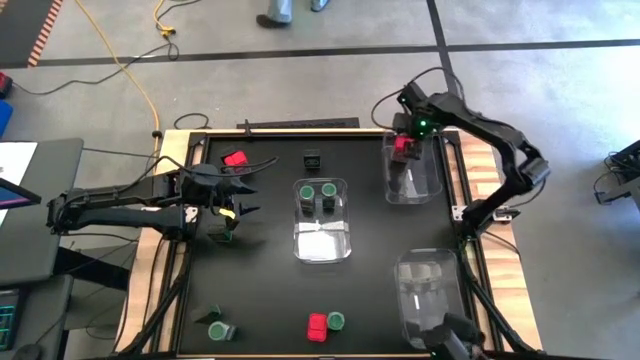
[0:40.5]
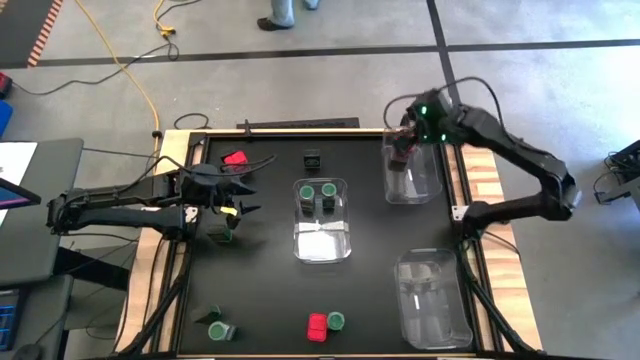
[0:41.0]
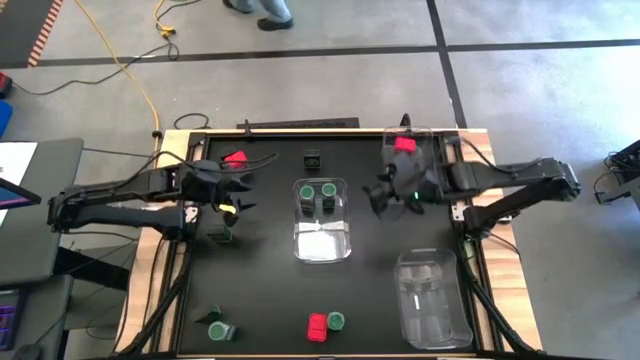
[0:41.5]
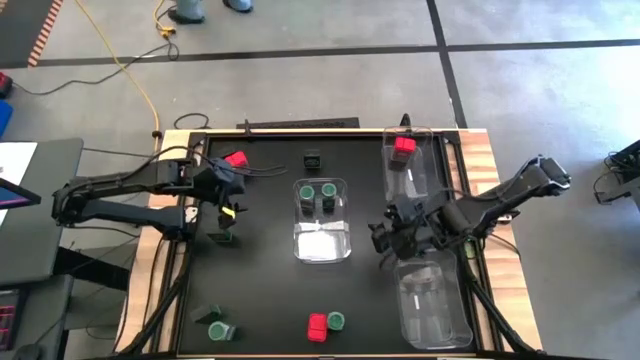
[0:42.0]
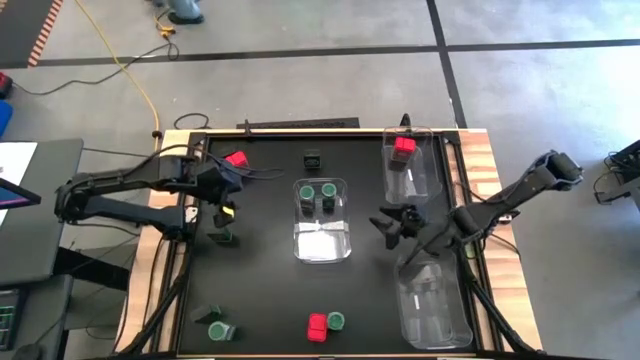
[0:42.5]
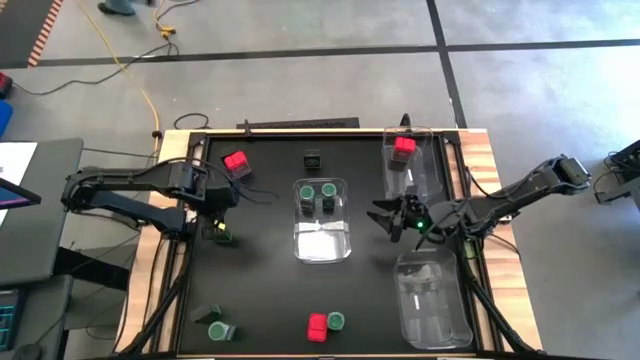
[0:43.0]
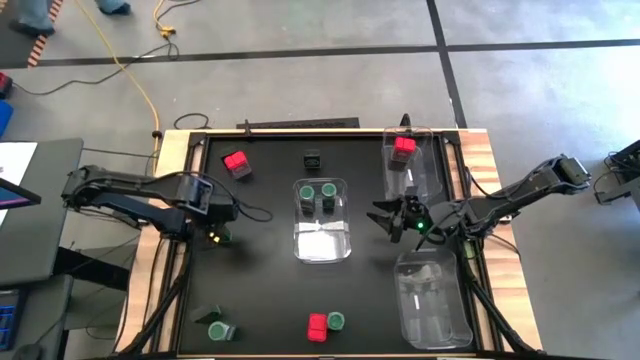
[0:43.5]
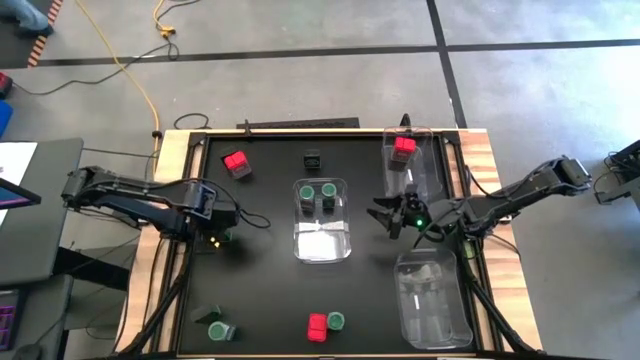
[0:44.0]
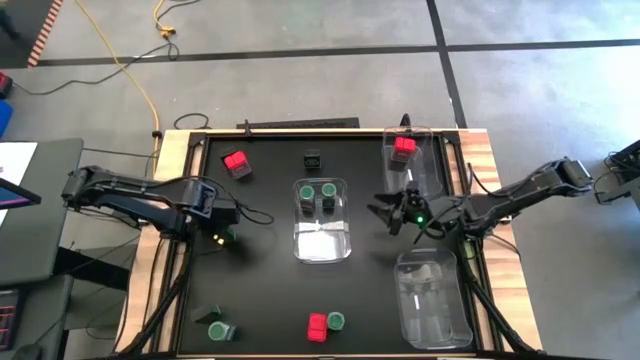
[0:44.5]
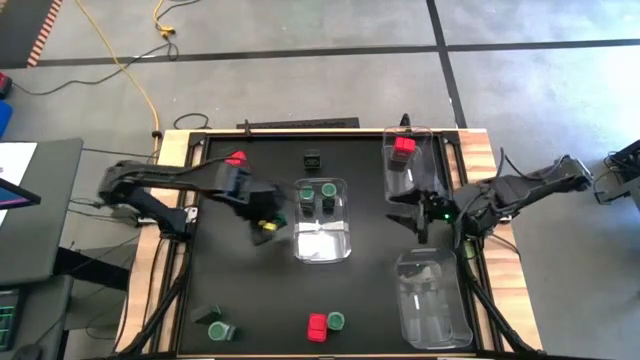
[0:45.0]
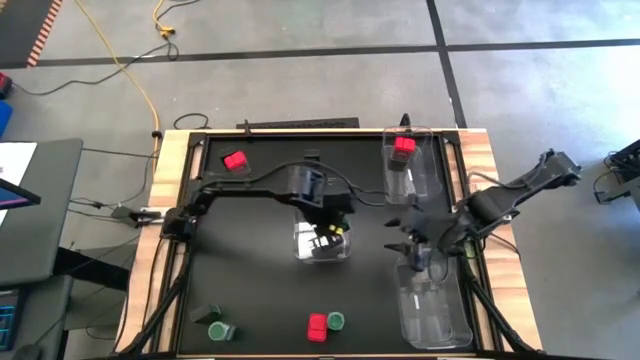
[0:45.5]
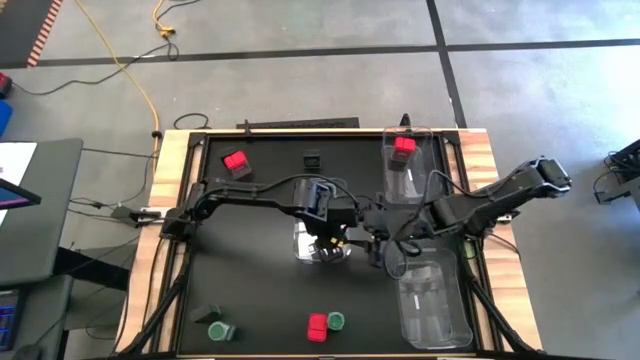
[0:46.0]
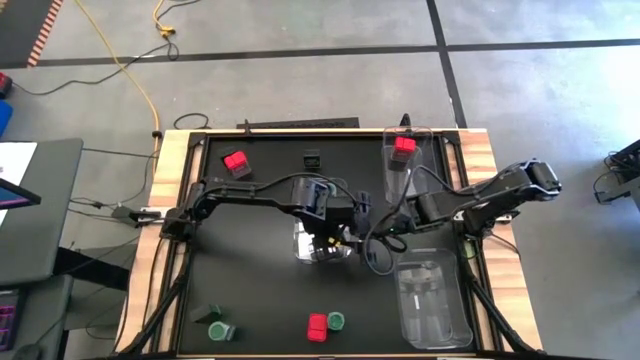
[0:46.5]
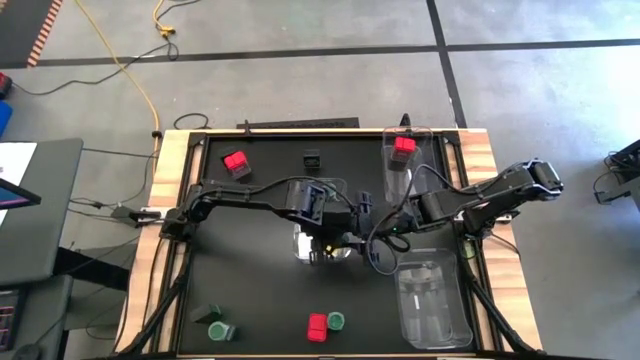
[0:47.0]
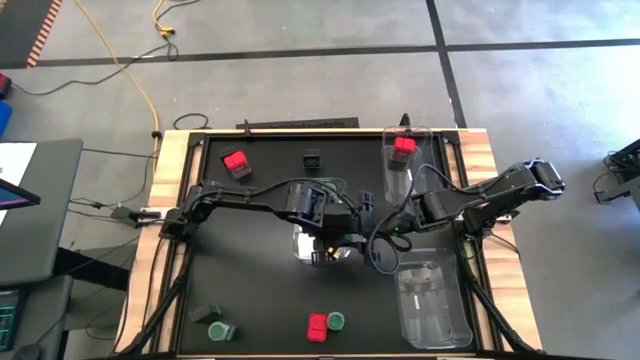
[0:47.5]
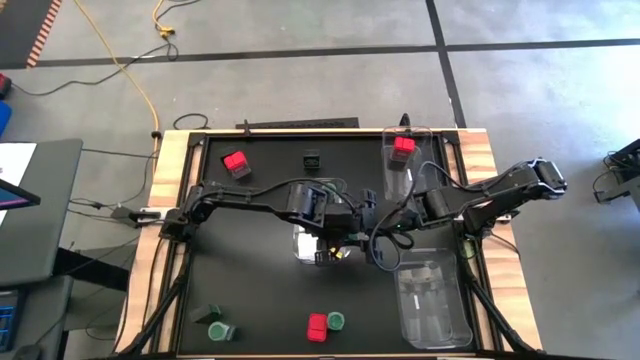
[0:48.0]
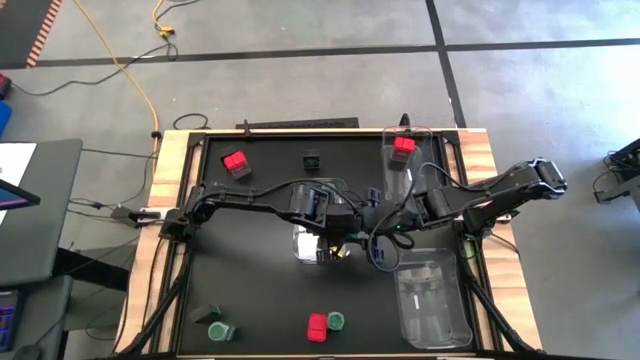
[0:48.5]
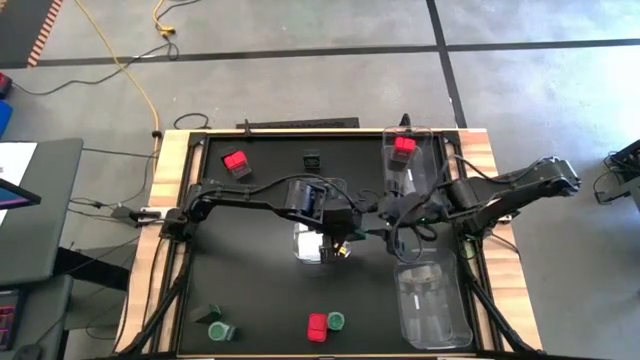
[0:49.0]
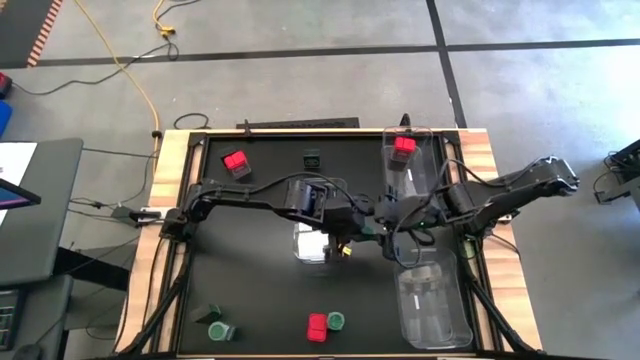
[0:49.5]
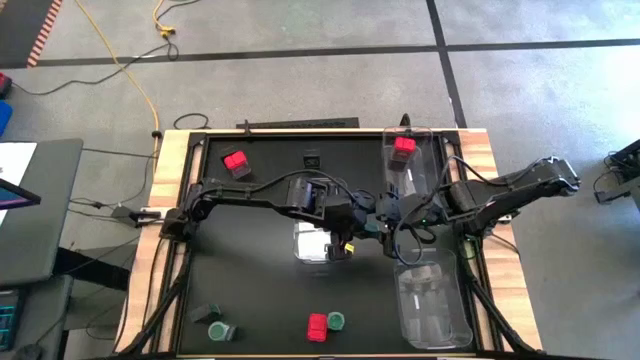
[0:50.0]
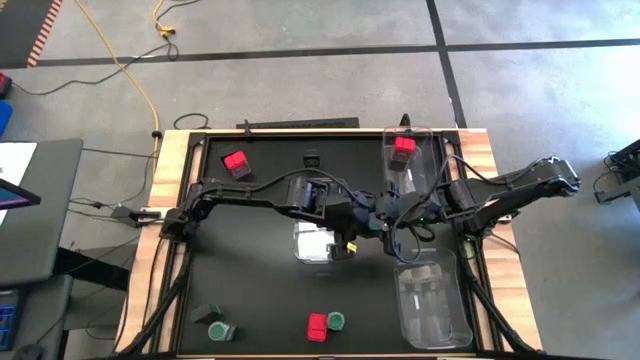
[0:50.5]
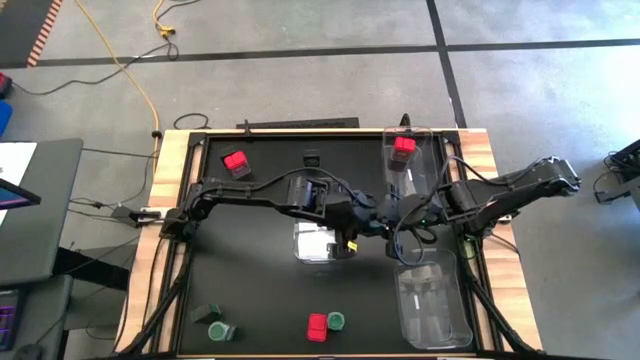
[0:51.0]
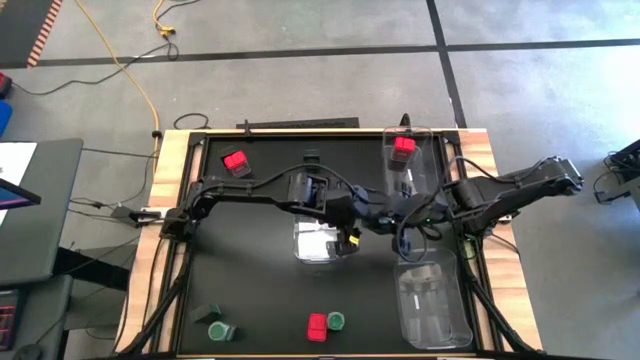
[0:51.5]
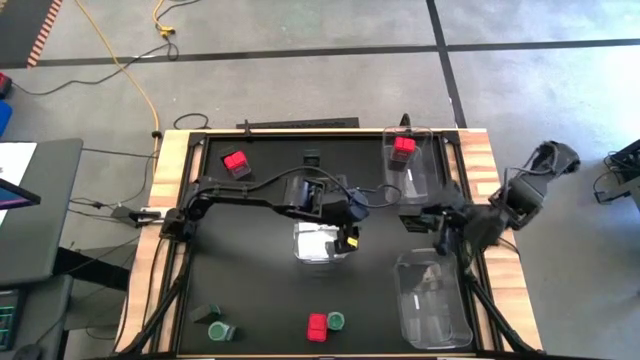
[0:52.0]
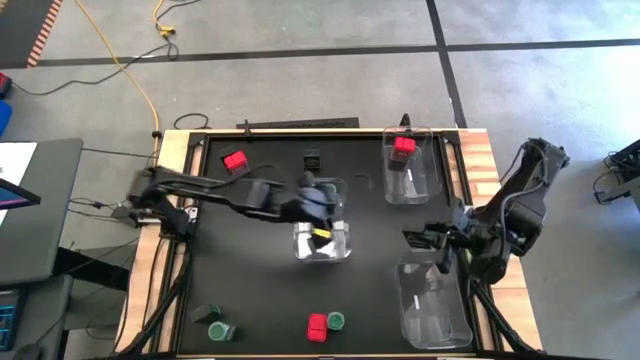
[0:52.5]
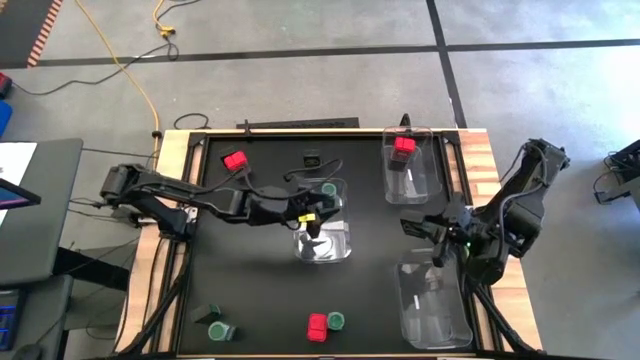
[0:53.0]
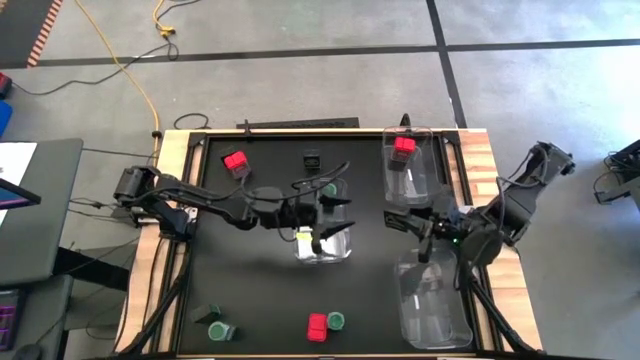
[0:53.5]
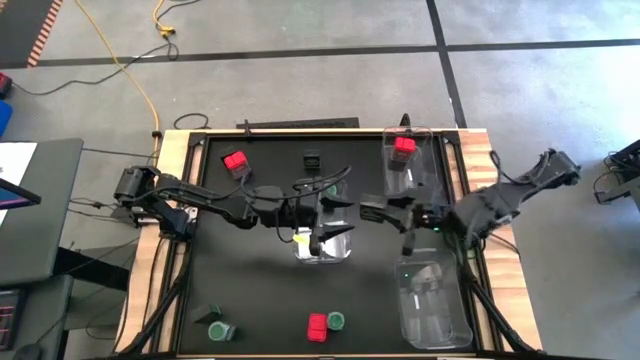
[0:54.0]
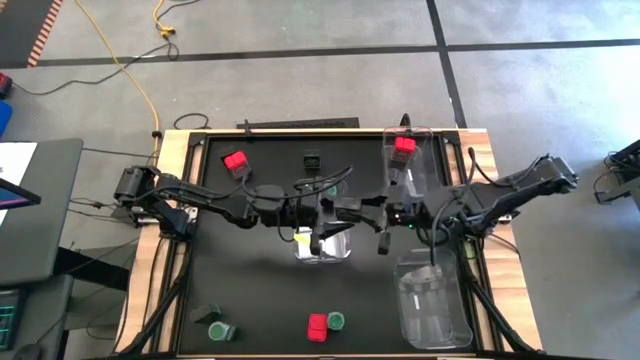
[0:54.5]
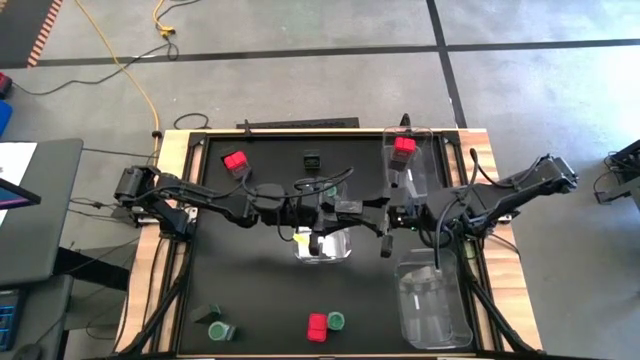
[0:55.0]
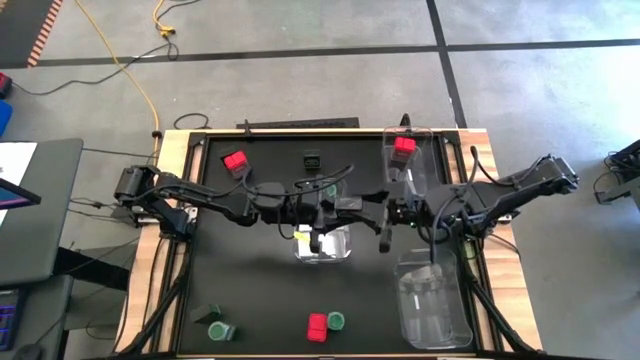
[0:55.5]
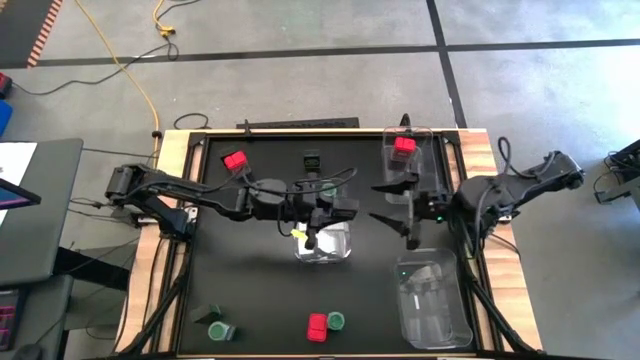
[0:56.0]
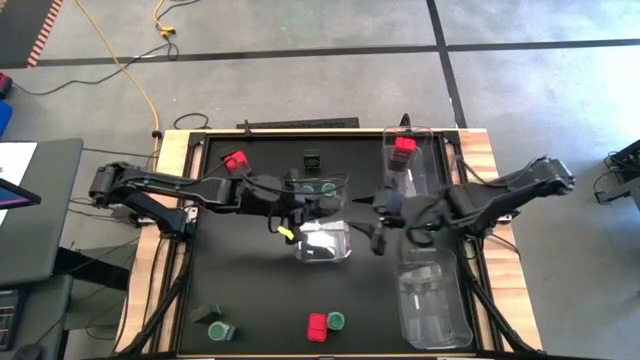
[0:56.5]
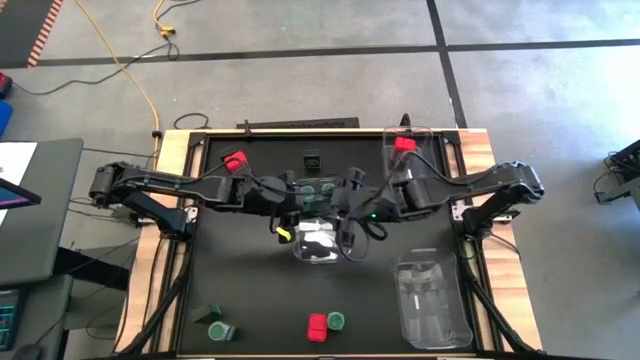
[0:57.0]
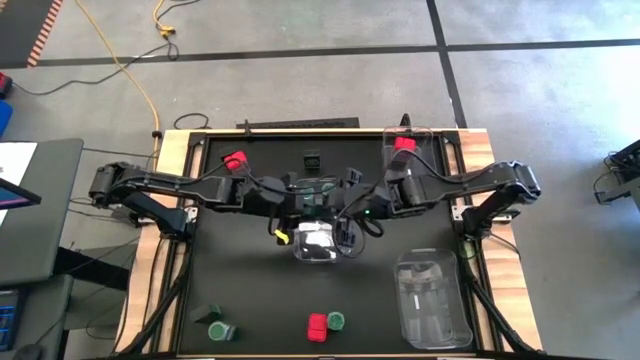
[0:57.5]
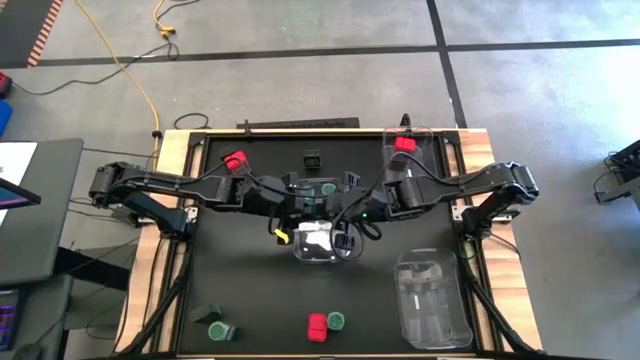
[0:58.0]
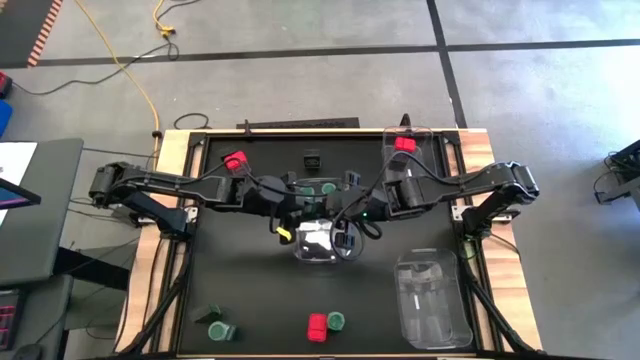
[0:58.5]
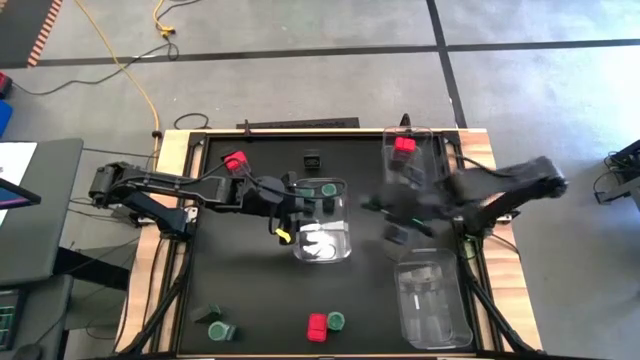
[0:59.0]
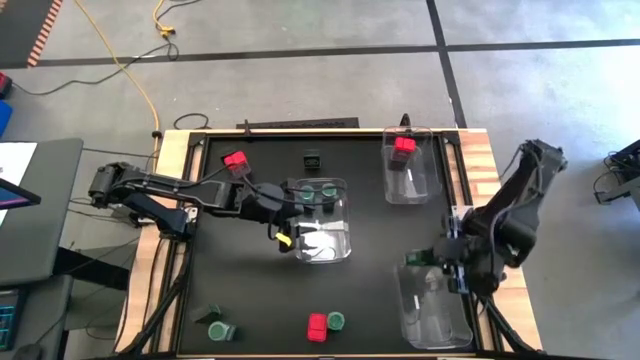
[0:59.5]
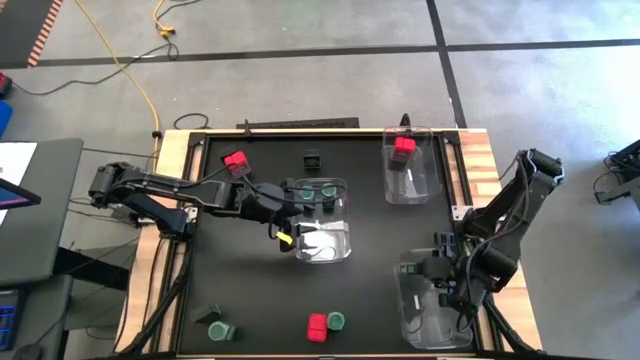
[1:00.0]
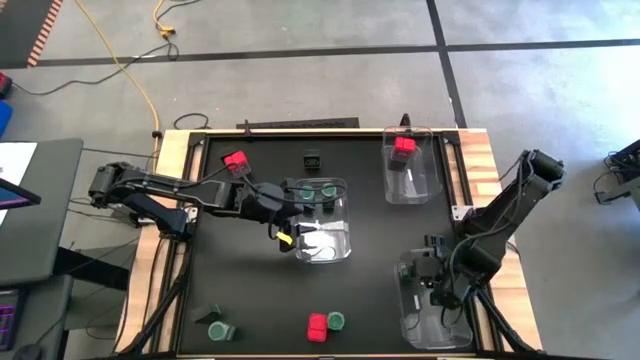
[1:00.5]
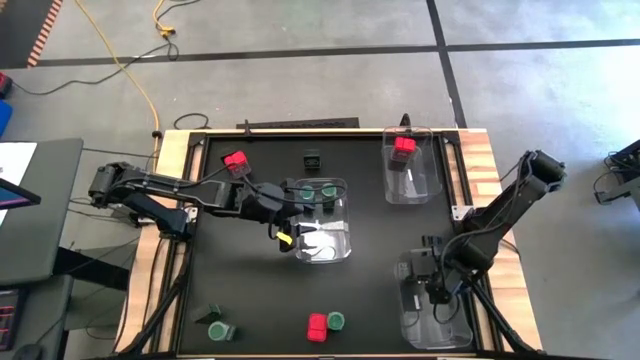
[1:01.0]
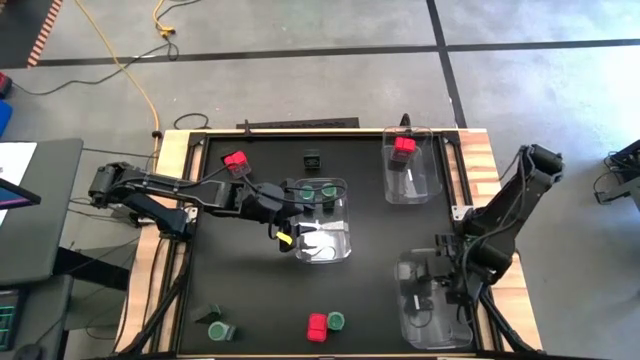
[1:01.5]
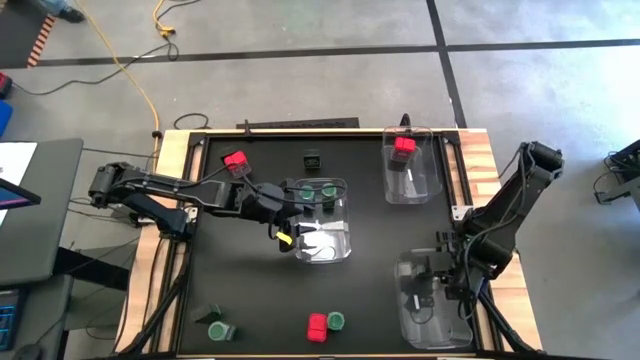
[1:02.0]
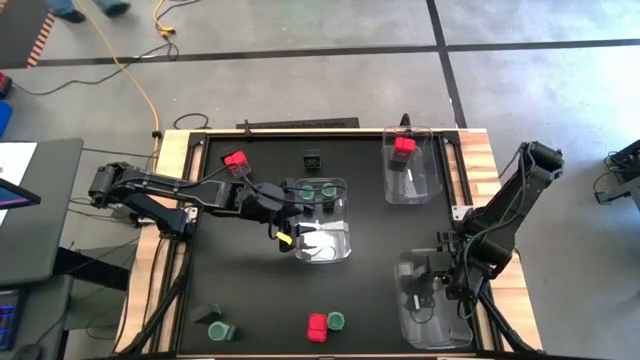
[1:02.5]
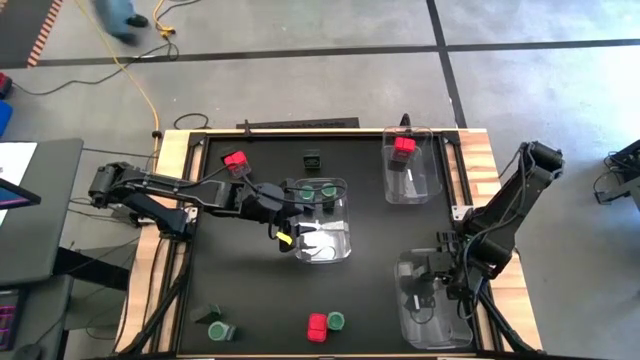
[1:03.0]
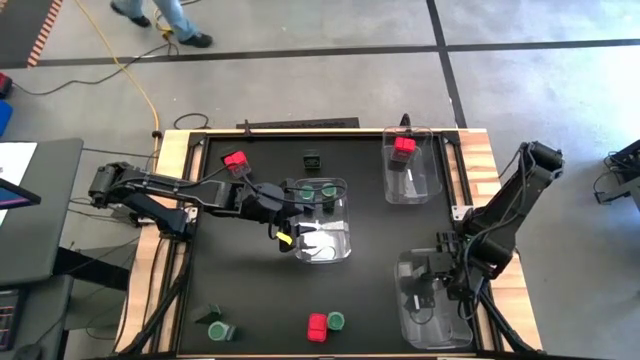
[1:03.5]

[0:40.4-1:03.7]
Task: Sort spices by type
Put the black seasoning can into the bottom transparent bin
